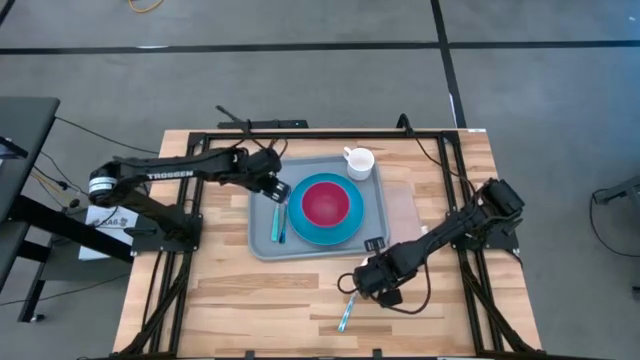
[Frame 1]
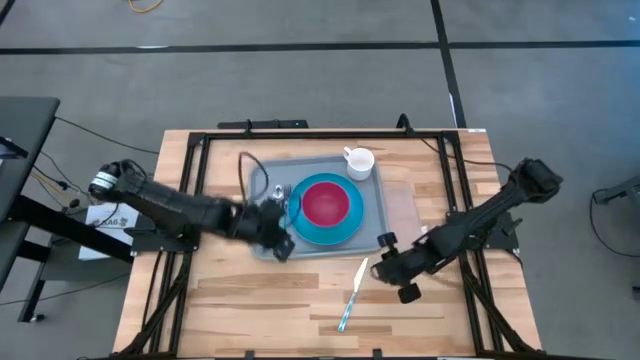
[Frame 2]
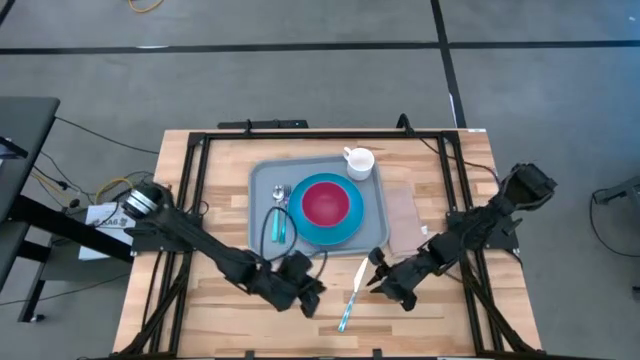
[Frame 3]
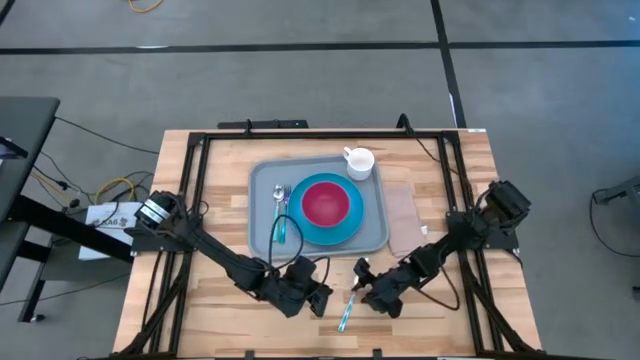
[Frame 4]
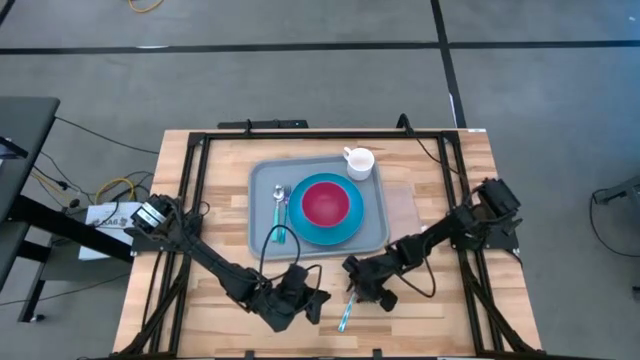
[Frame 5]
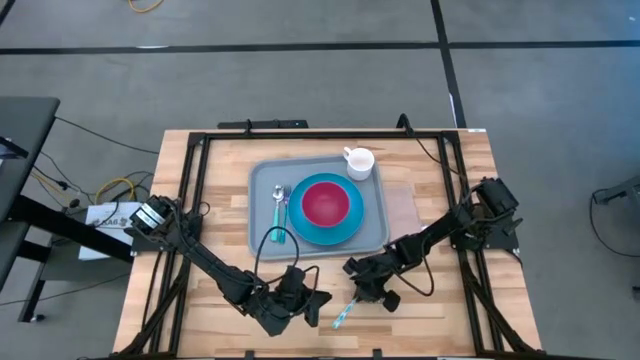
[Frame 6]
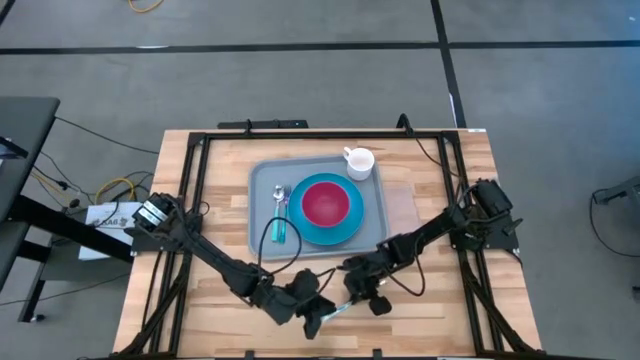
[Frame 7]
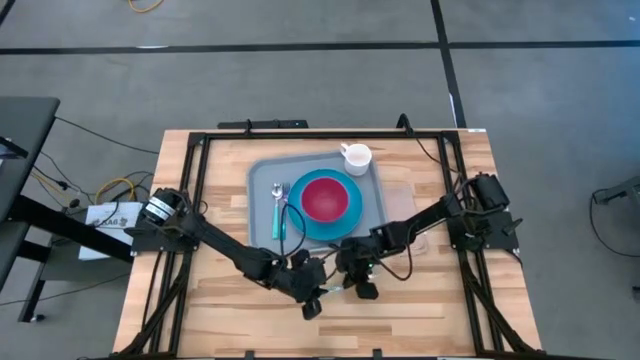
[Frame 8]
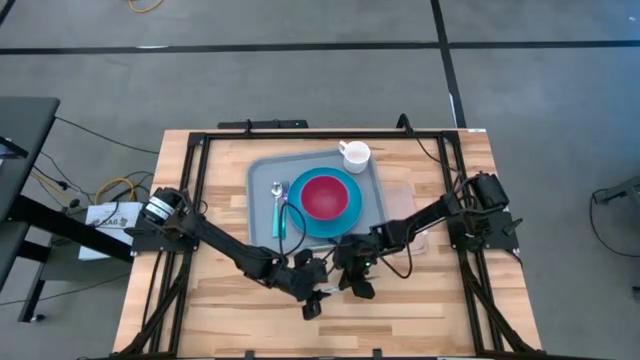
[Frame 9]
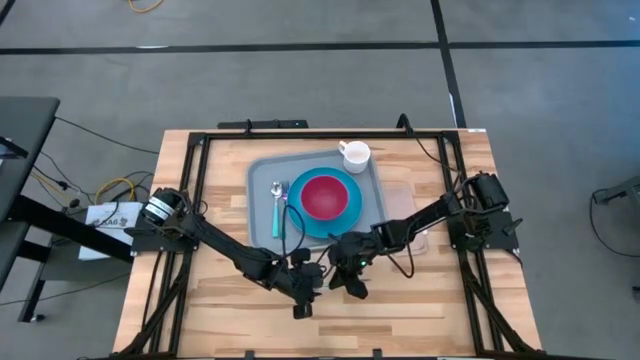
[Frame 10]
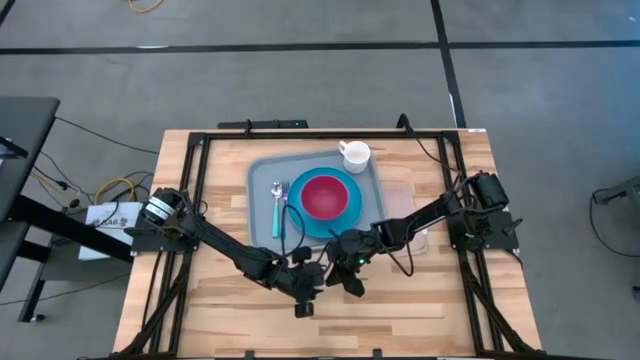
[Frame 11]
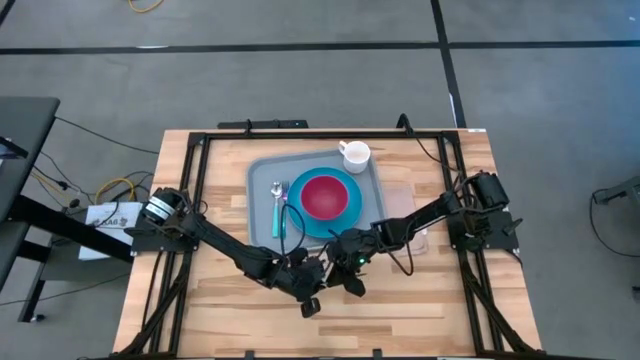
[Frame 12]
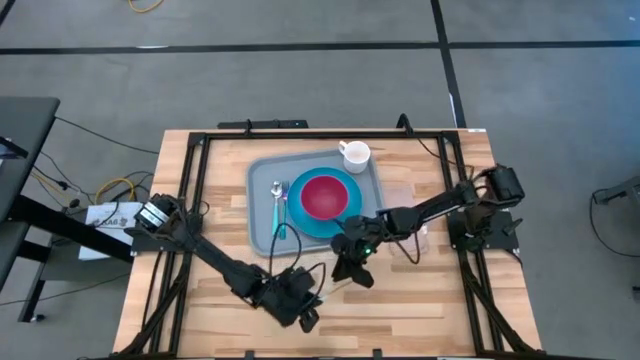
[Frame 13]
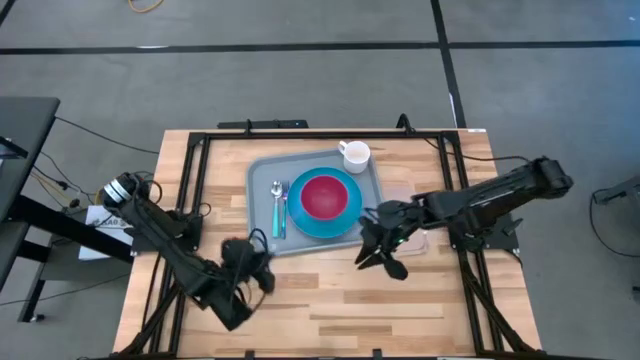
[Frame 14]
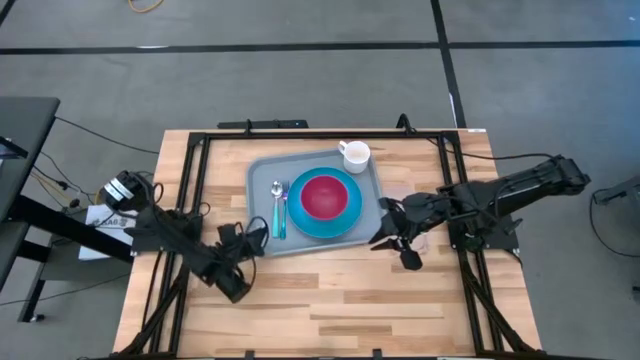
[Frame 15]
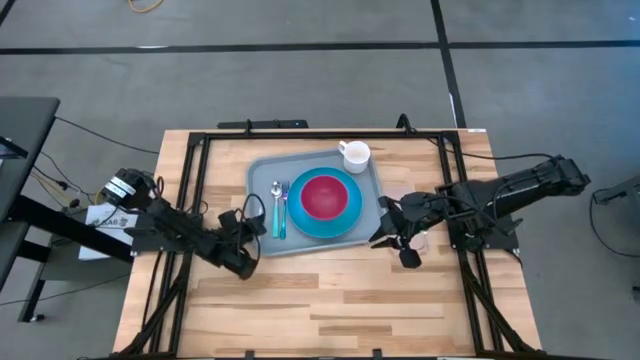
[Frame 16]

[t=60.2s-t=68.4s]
Task: Set up tray
Put the knife to the left side of the spoon on the tray

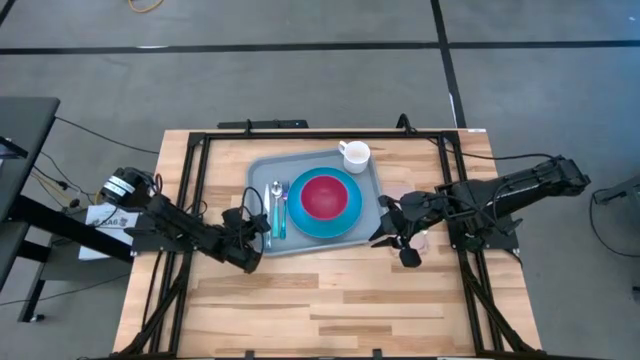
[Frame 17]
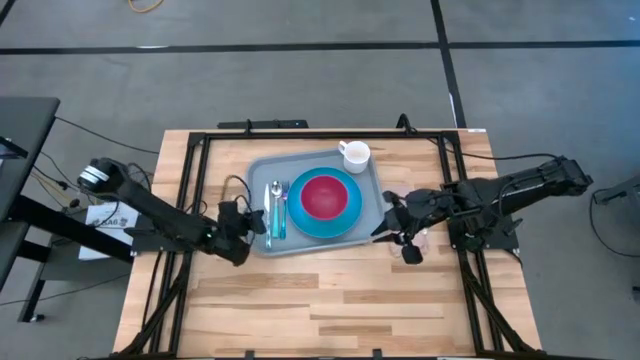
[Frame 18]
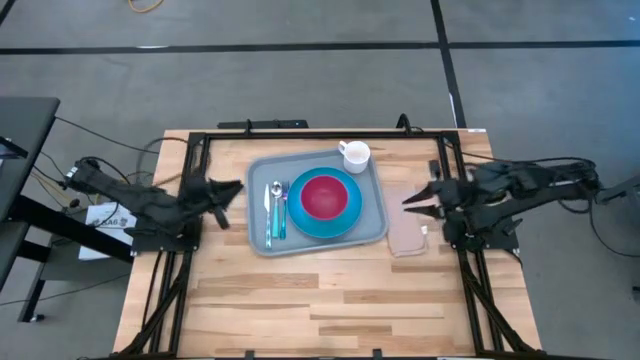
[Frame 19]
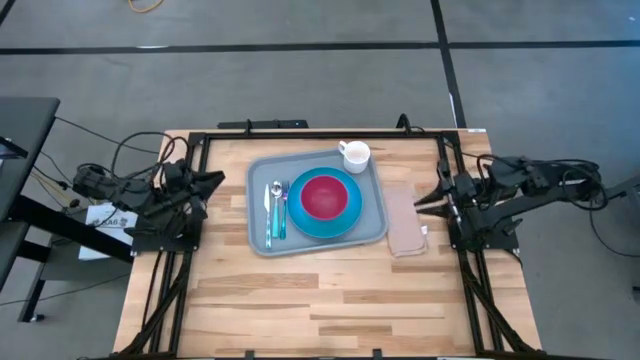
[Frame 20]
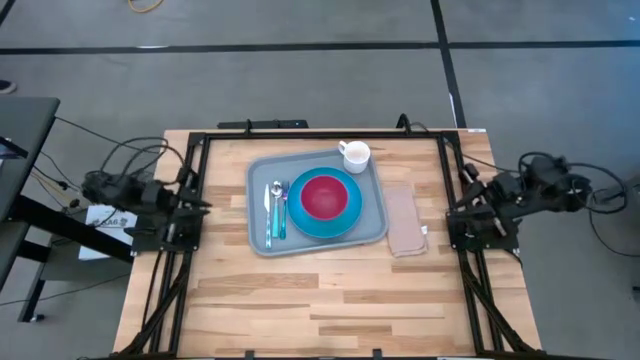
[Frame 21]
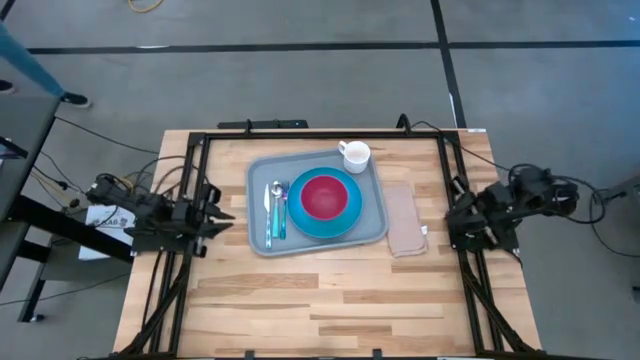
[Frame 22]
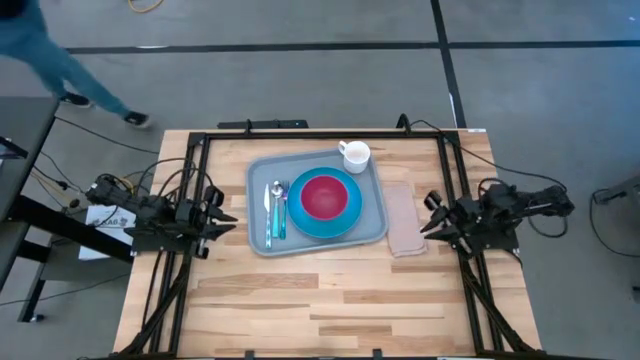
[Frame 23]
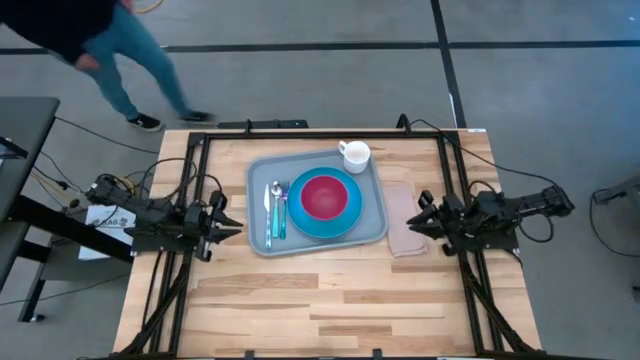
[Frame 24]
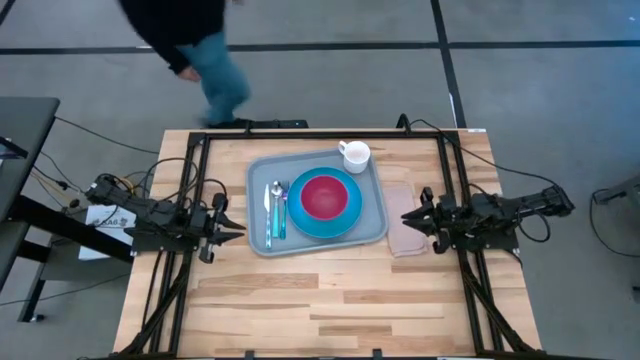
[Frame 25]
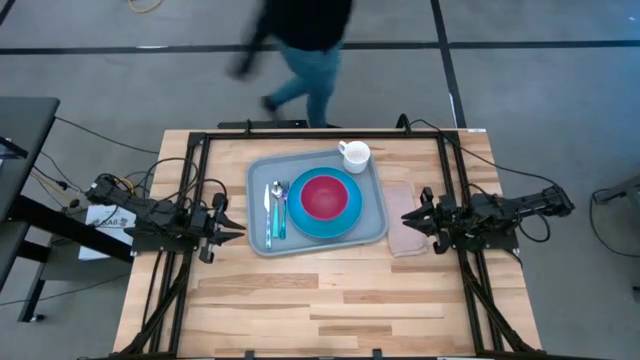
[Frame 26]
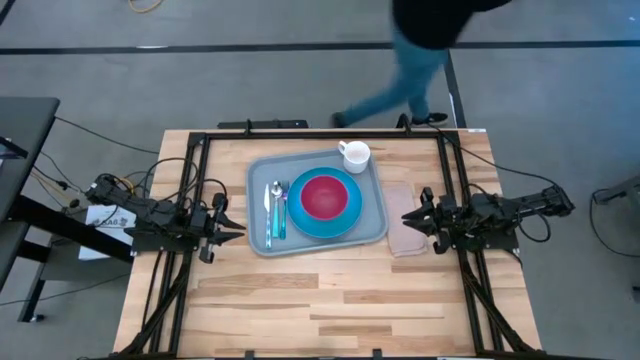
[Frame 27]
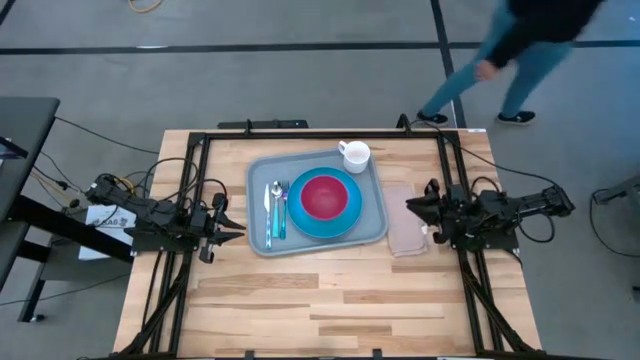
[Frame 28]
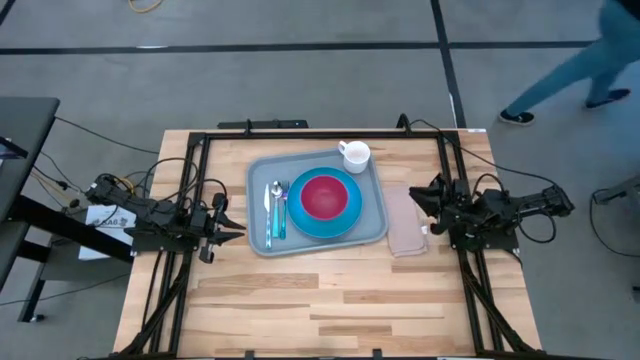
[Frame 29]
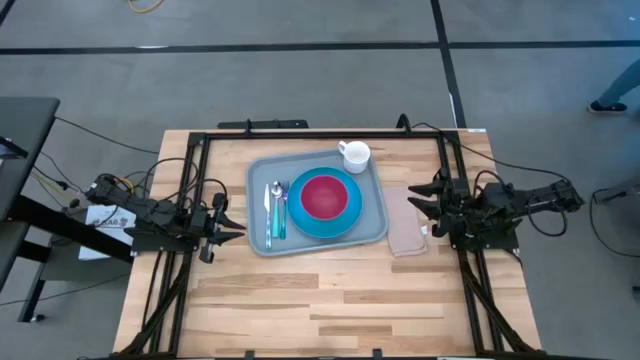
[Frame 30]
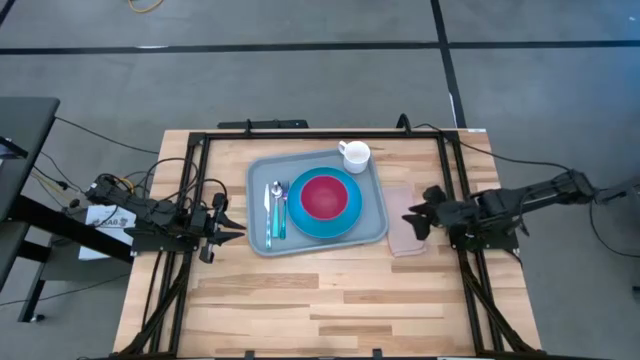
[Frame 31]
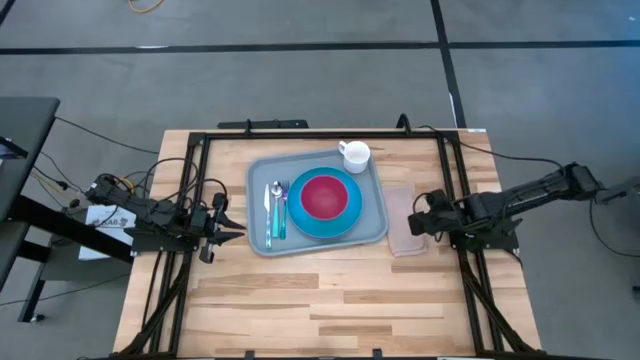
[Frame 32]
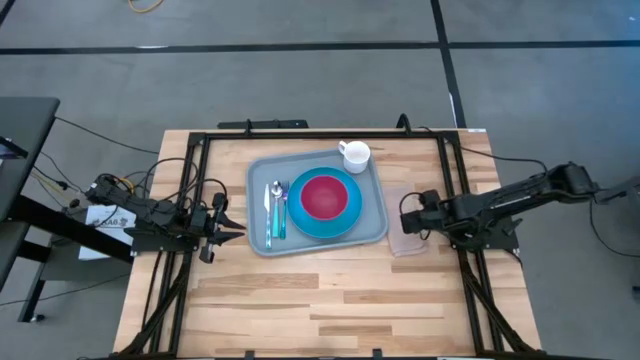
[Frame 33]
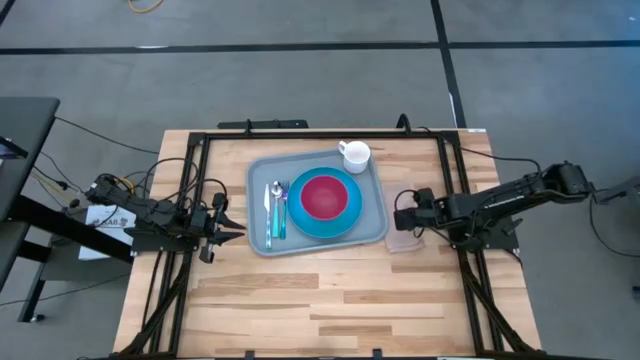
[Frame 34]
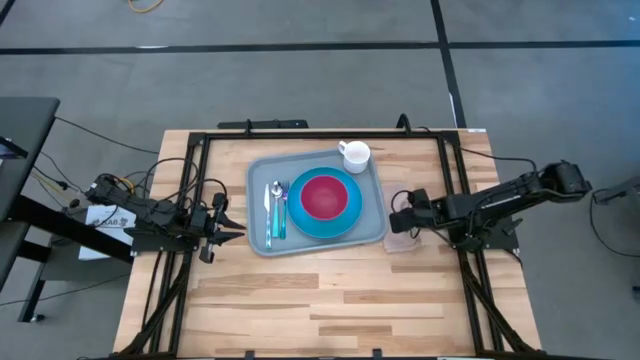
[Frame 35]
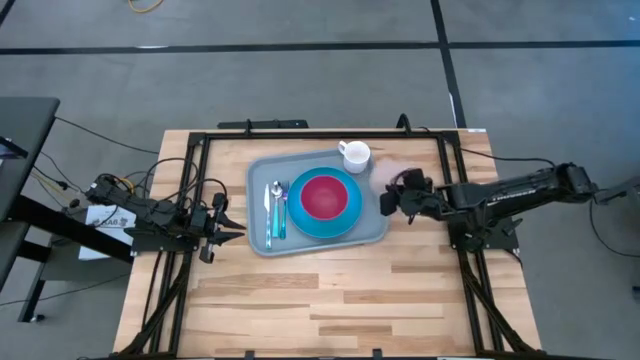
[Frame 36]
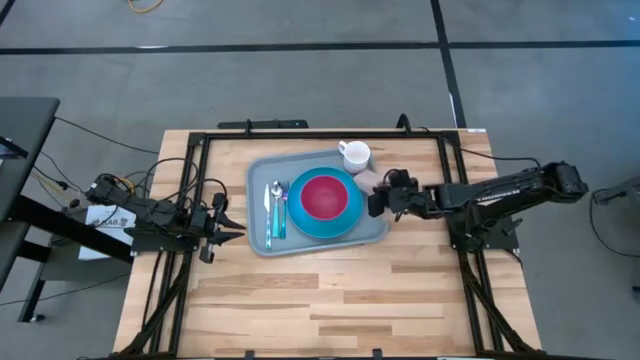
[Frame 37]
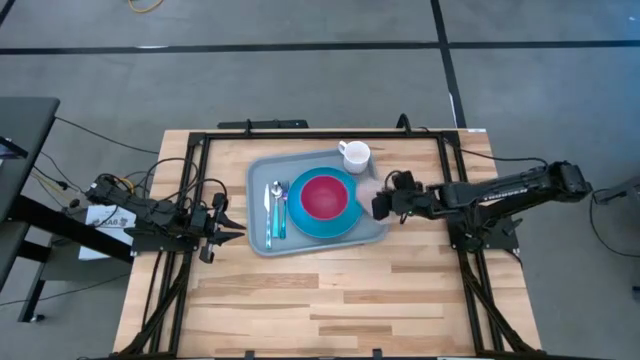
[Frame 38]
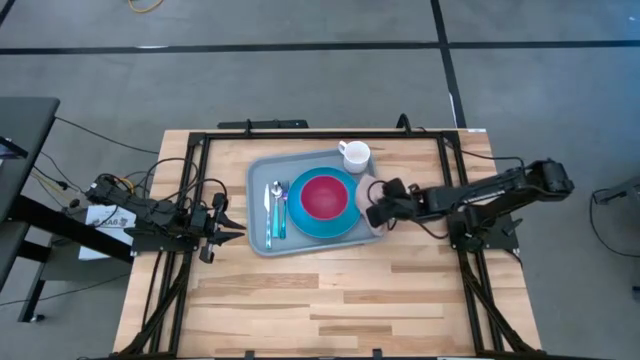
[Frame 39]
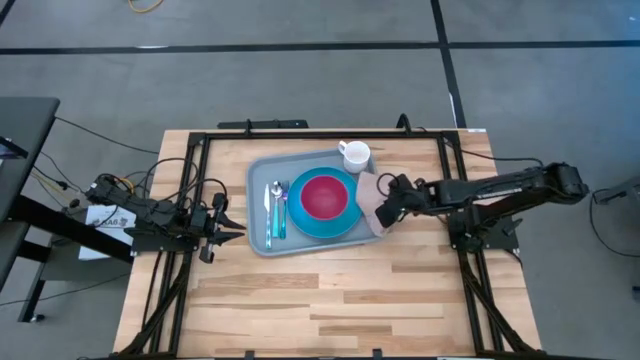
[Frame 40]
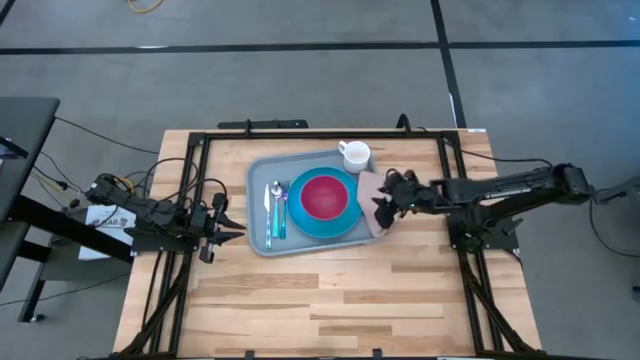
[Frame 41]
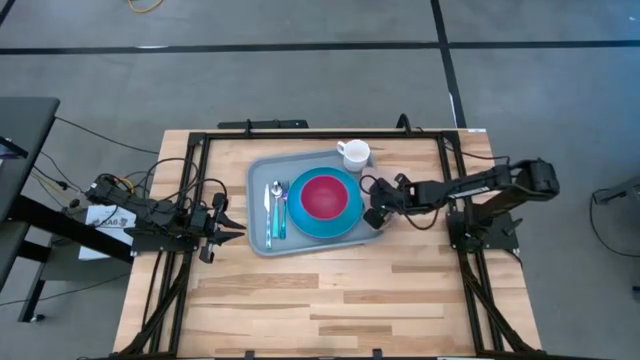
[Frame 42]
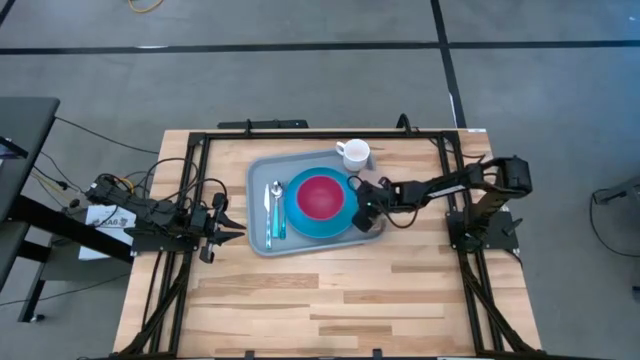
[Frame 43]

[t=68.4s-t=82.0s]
Put the napkin on the right side of the plate on the tray
